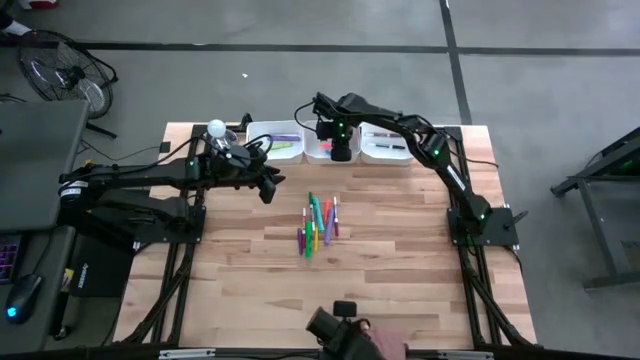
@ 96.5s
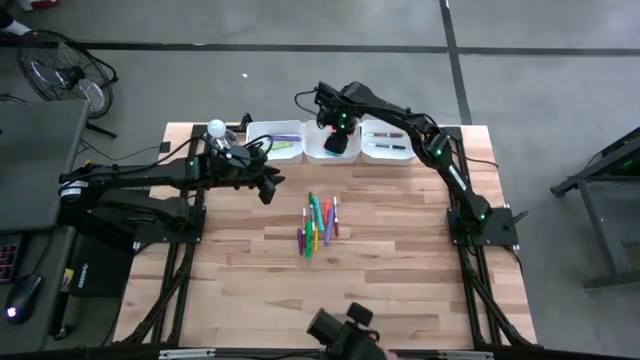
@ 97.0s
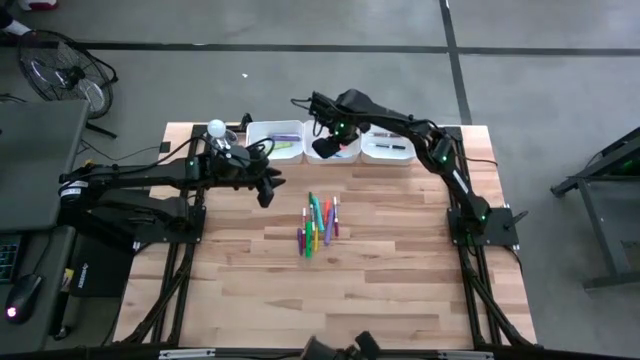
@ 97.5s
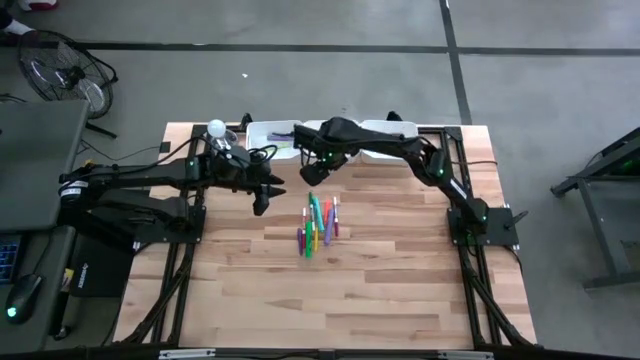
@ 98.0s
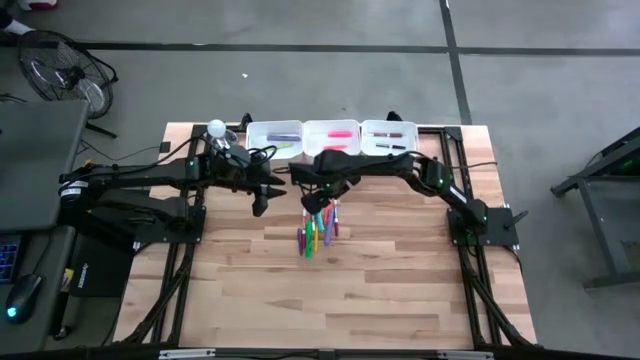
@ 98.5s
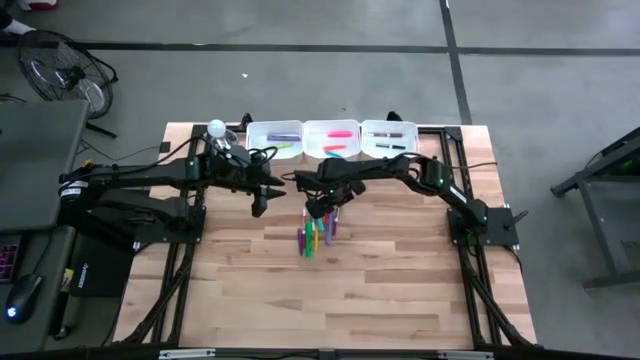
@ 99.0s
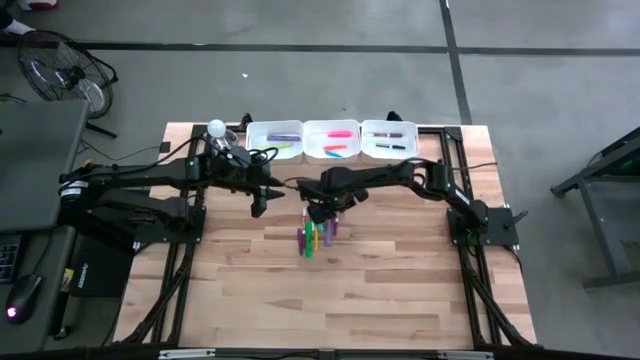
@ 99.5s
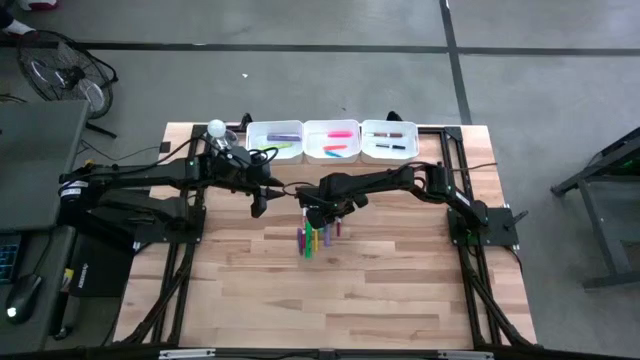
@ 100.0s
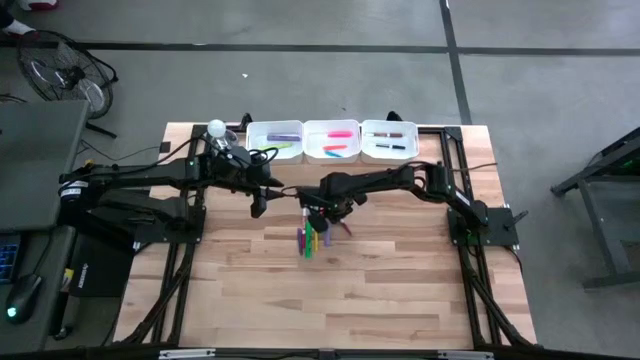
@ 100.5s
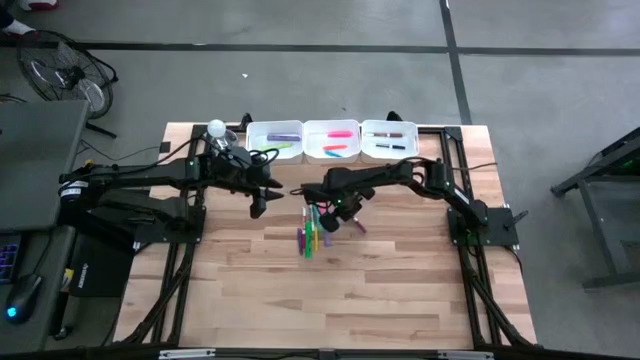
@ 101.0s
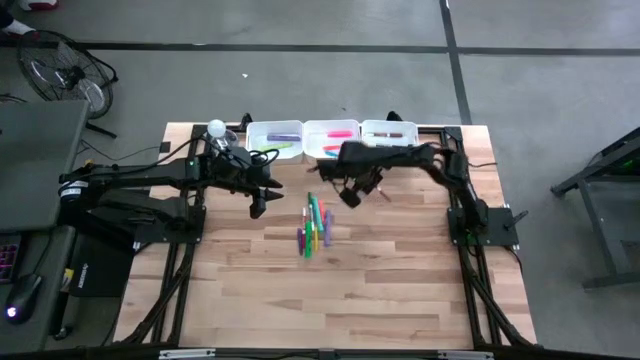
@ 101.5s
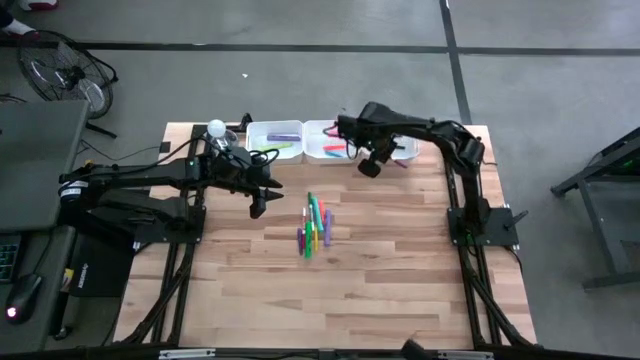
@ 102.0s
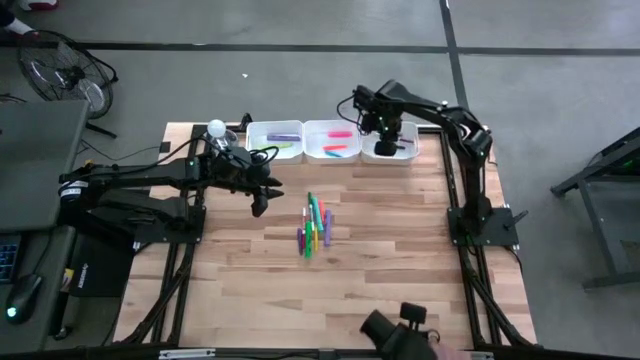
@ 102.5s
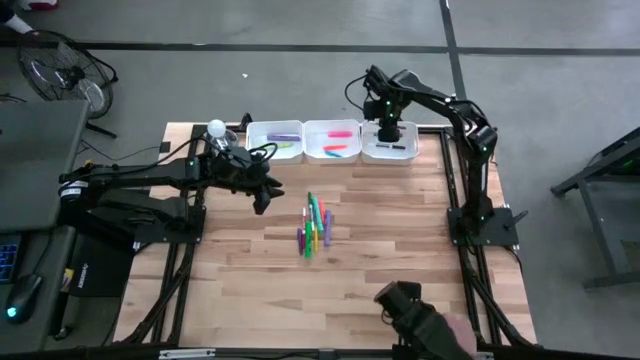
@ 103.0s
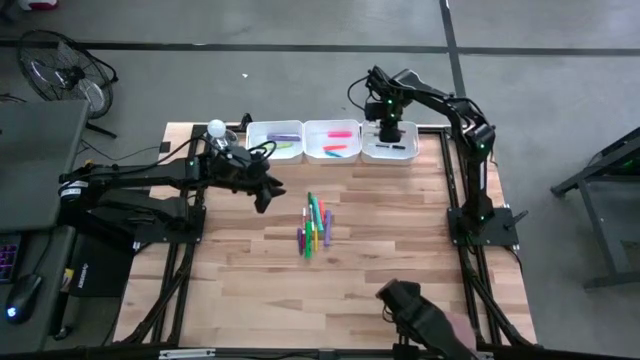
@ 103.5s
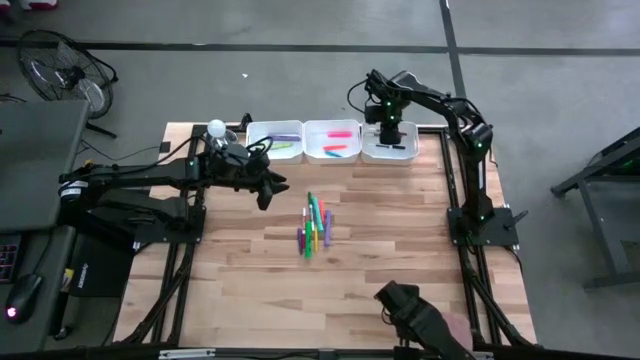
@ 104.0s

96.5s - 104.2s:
Task: Pick & Place Markers
Put the violet marker pen into the right white bin

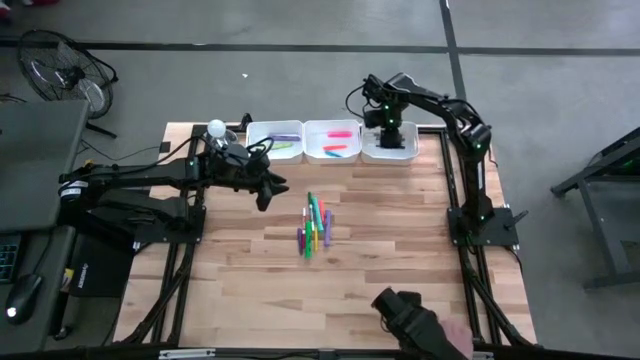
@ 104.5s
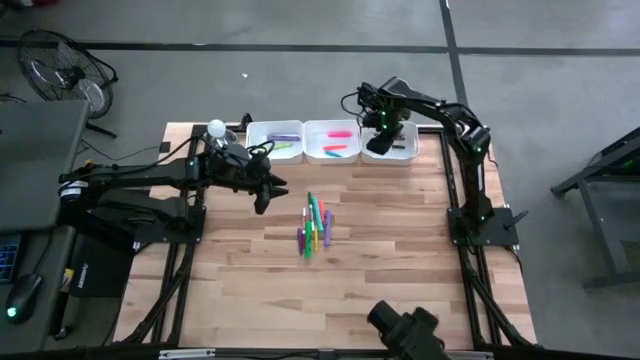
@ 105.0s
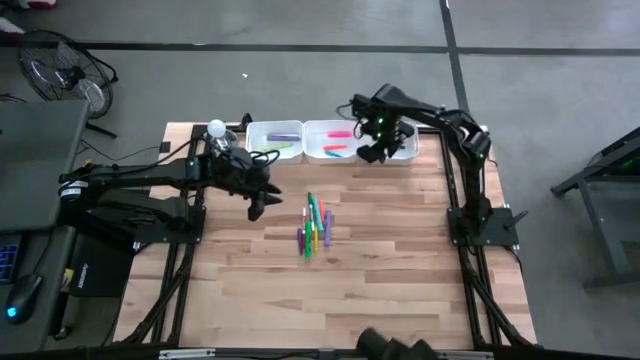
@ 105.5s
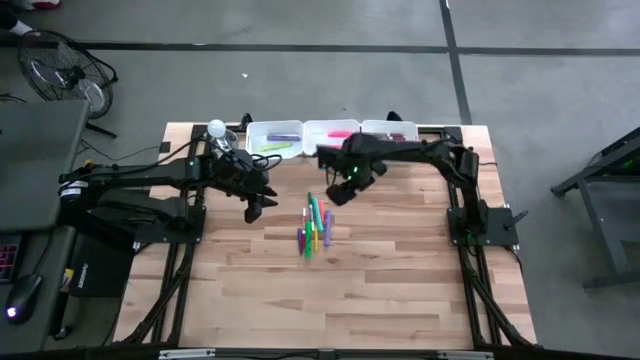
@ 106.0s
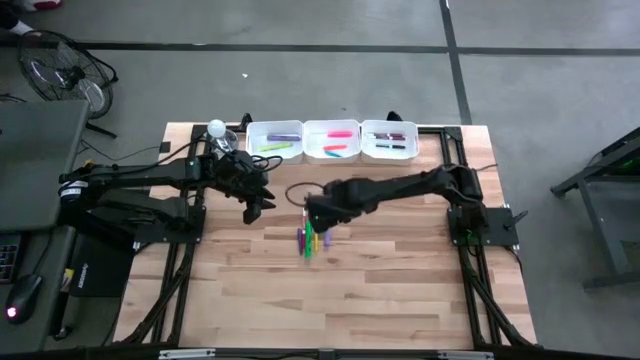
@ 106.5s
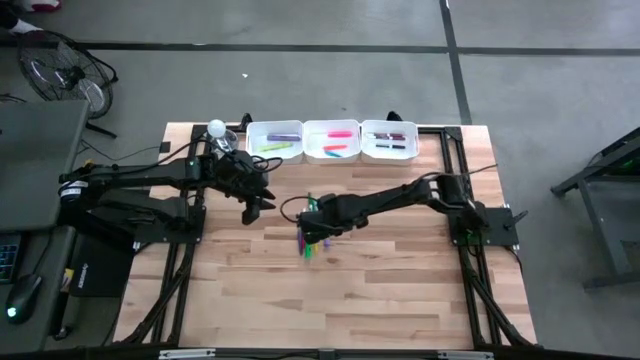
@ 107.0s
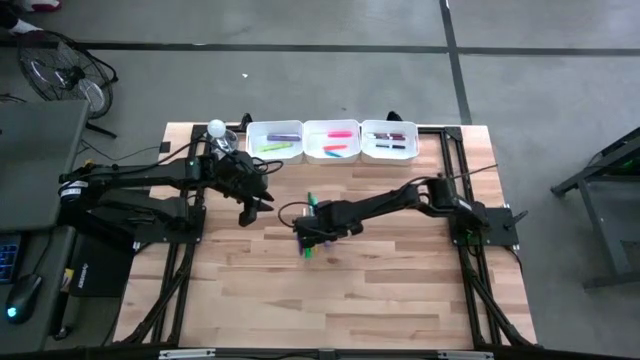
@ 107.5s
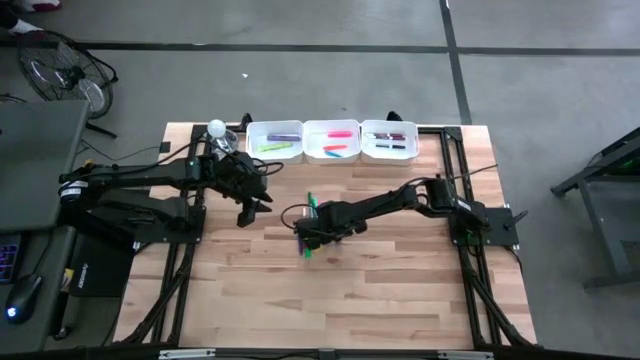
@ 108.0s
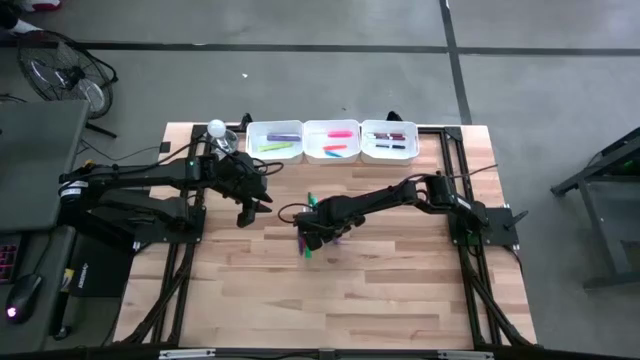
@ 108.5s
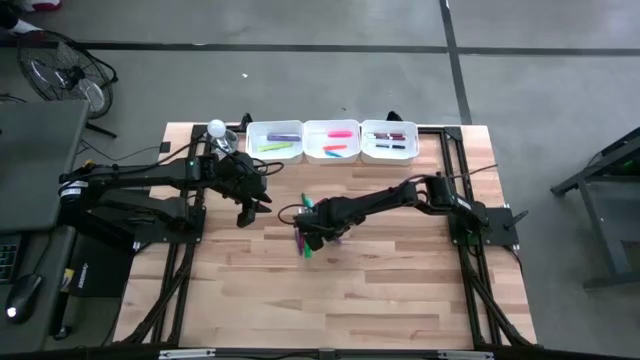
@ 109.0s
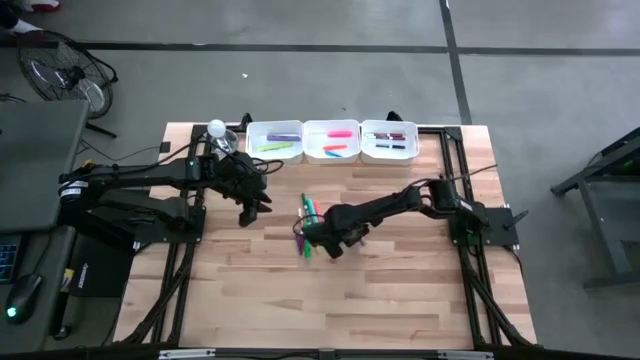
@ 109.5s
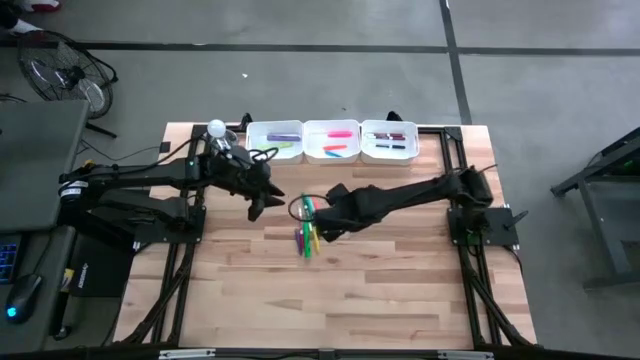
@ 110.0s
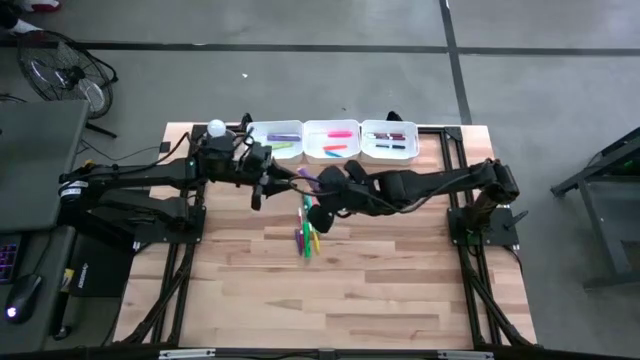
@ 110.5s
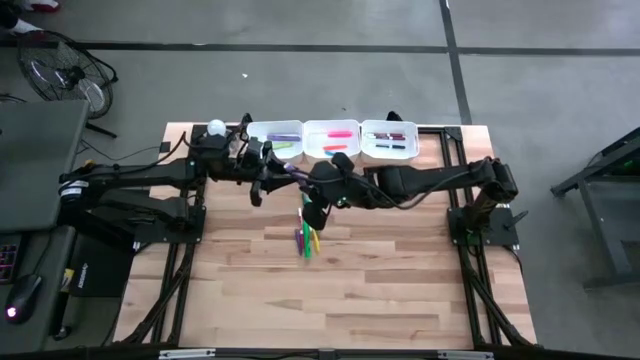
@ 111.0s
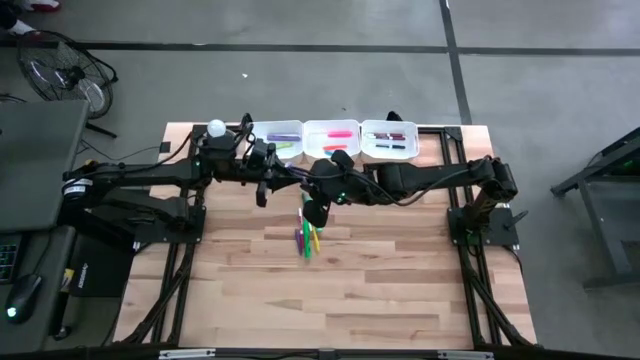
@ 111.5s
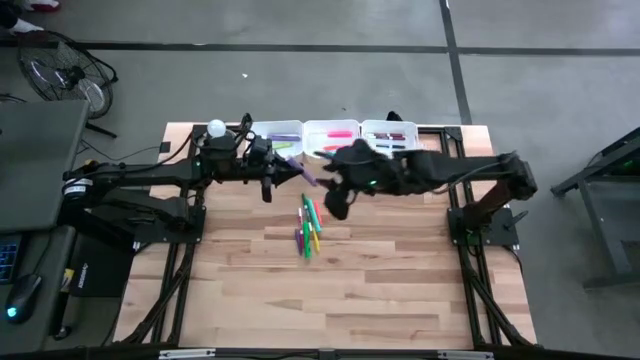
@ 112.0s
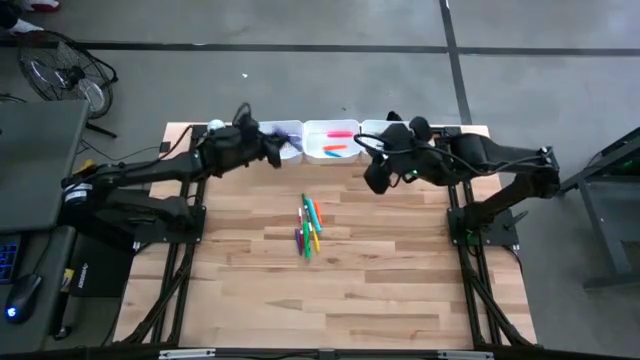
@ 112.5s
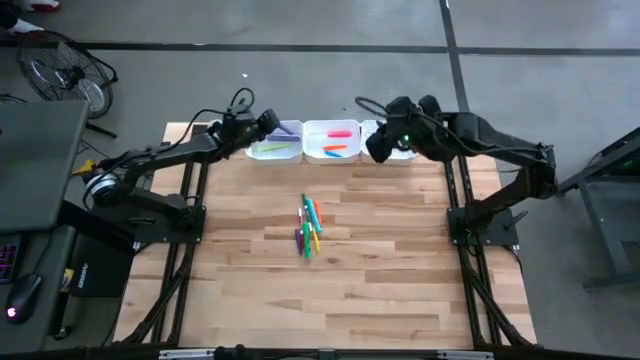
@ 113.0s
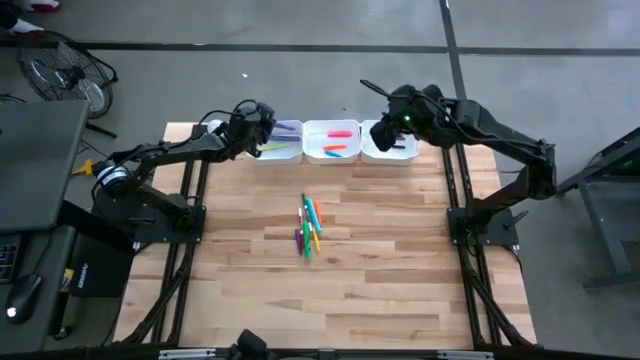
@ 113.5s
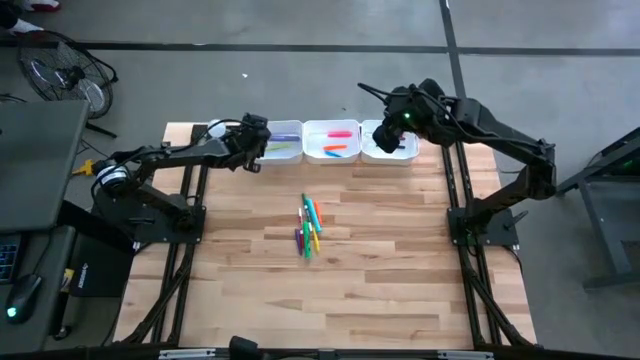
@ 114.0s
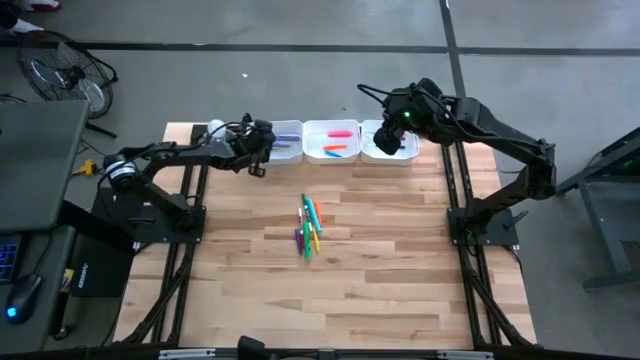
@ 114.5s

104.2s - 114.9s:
Put the violet highlighter pen into the left white bin

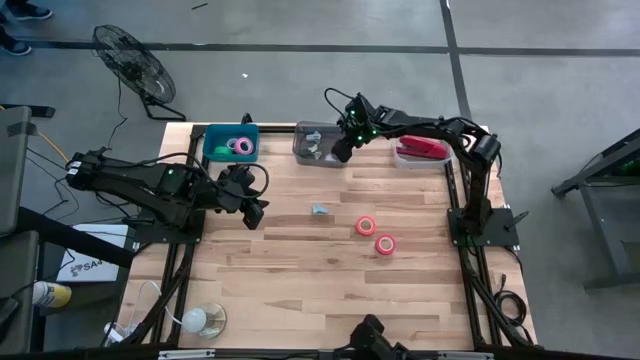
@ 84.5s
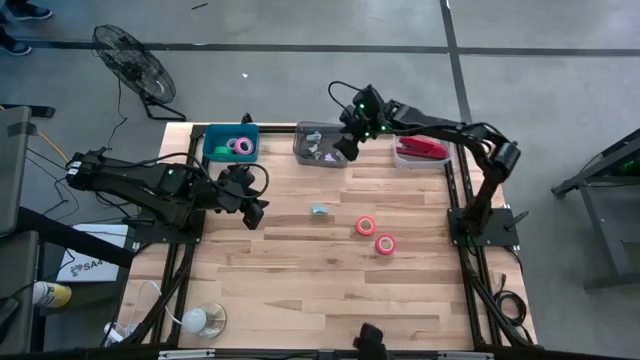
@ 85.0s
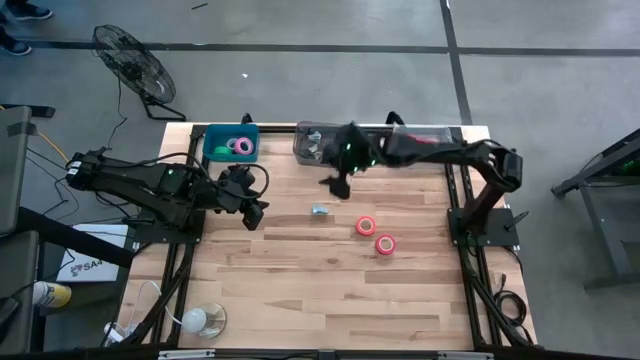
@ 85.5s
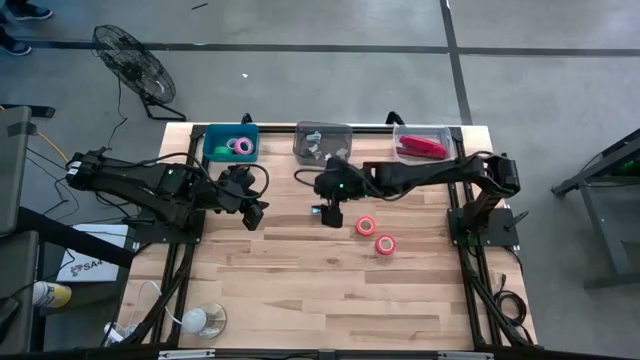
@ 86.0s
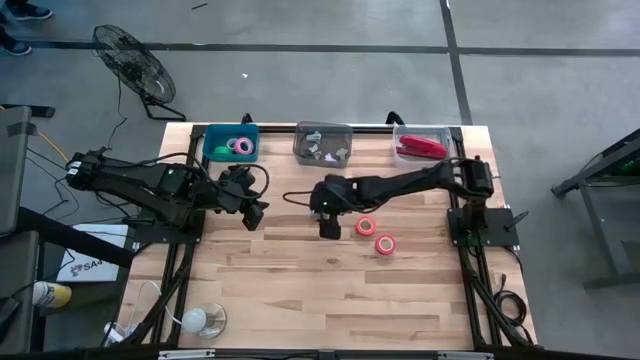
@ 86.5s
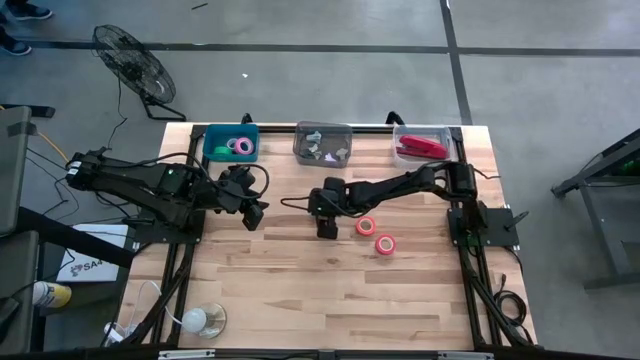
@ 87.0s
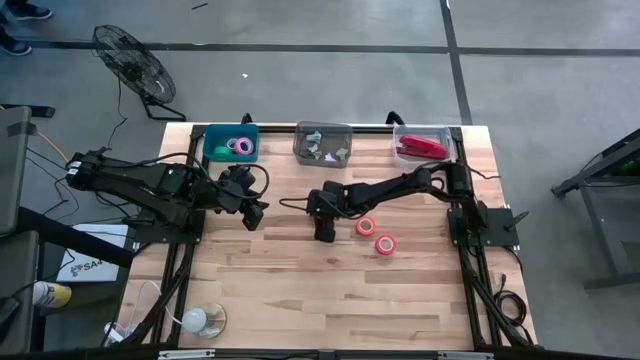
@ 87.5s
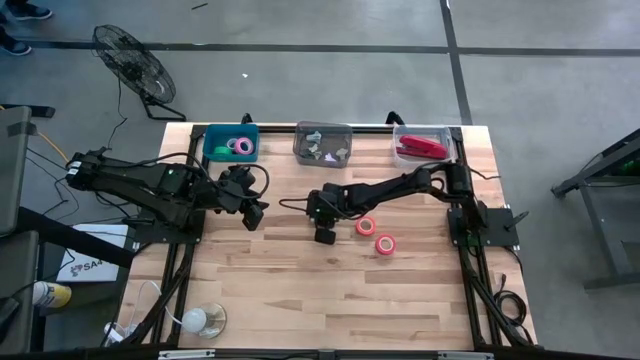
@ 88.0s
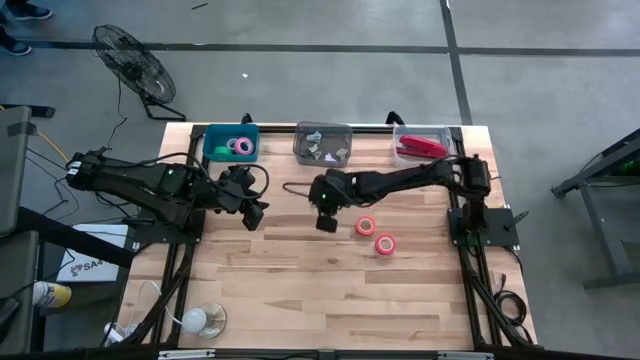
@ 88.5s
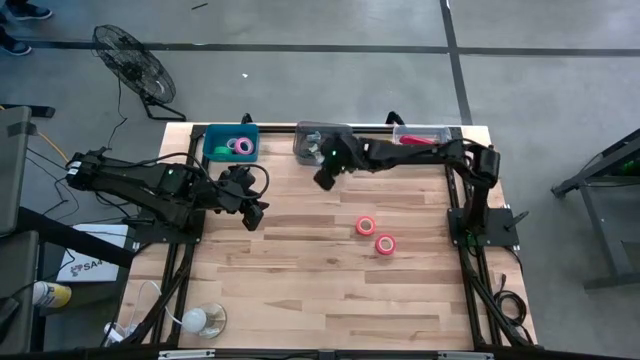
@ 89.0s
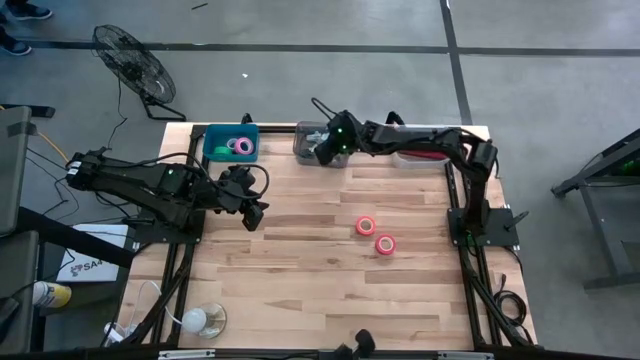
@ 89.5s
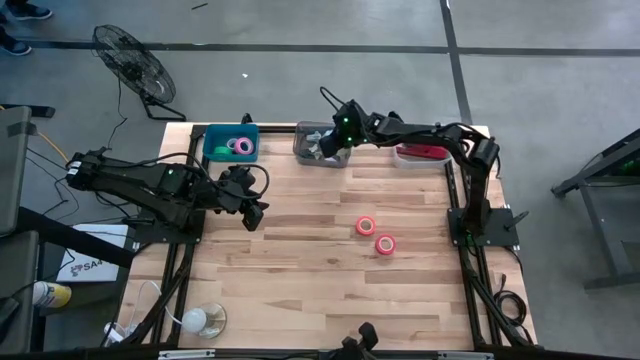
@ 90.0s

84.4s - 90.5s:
Task: Pick and place Stapler, Stapler remover, tape
Put the blue staple remover into the black bin
